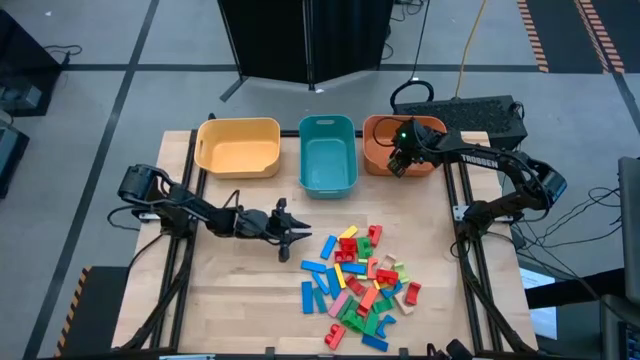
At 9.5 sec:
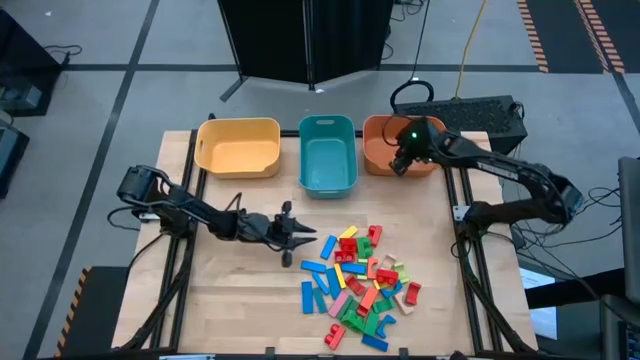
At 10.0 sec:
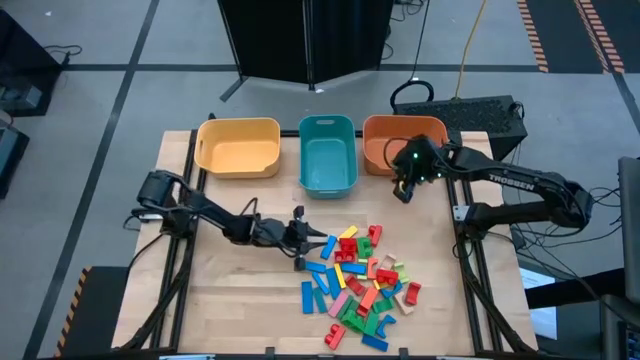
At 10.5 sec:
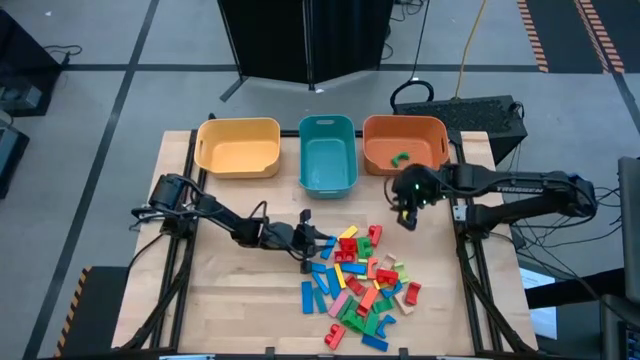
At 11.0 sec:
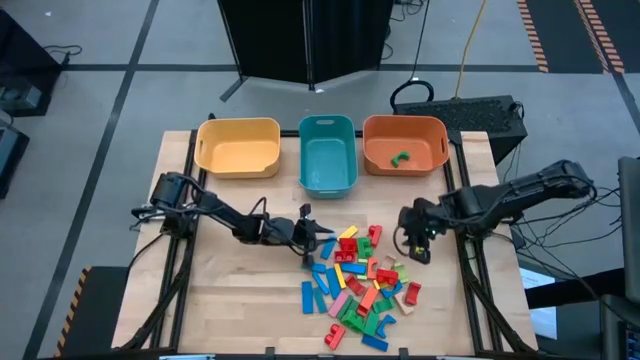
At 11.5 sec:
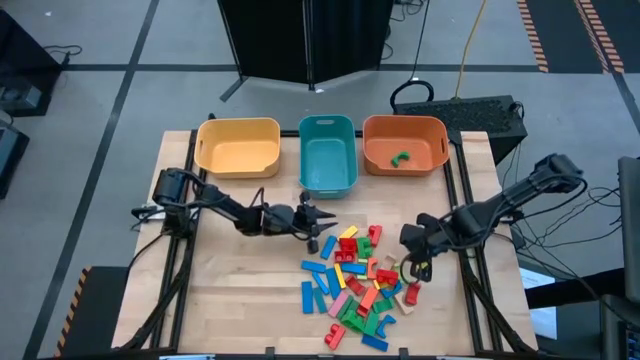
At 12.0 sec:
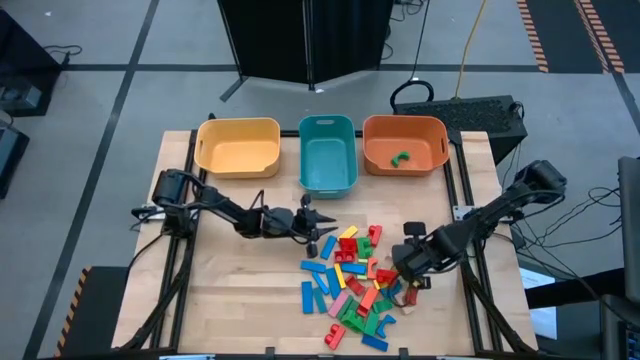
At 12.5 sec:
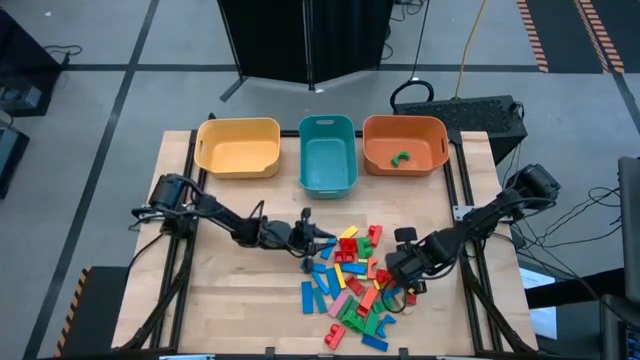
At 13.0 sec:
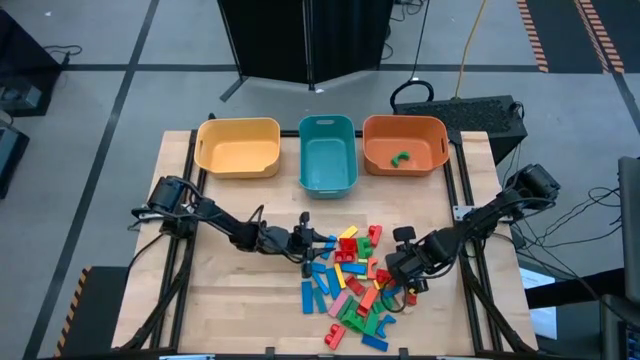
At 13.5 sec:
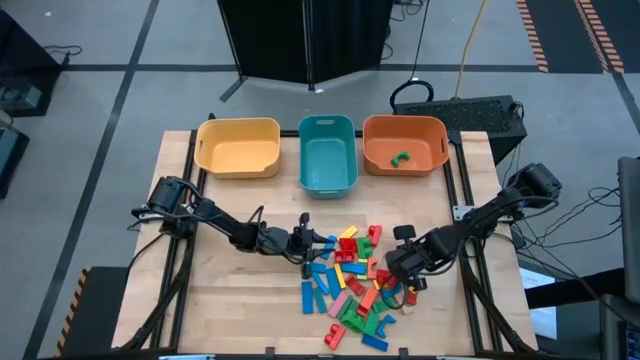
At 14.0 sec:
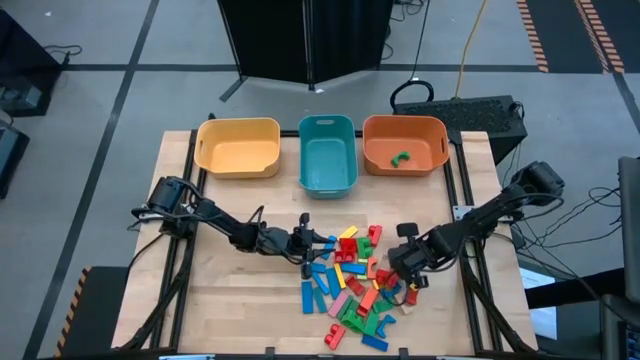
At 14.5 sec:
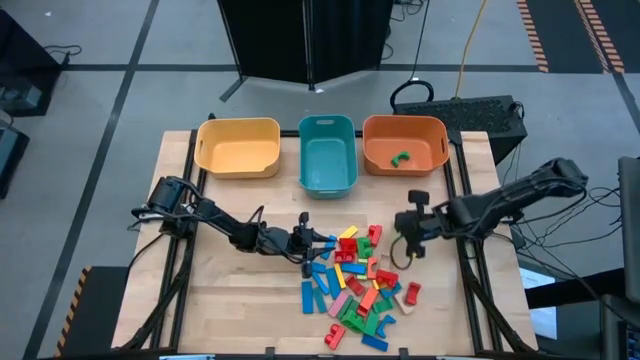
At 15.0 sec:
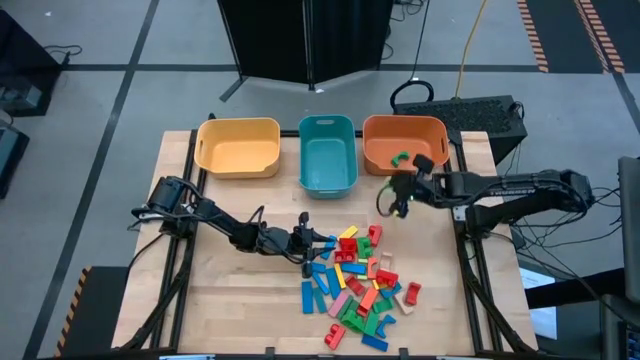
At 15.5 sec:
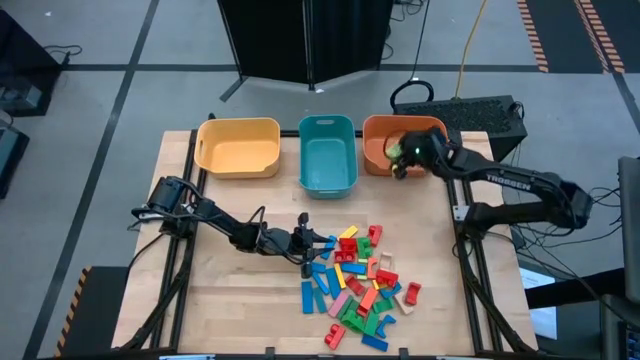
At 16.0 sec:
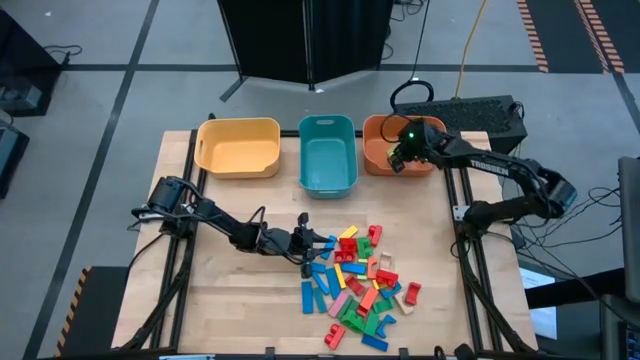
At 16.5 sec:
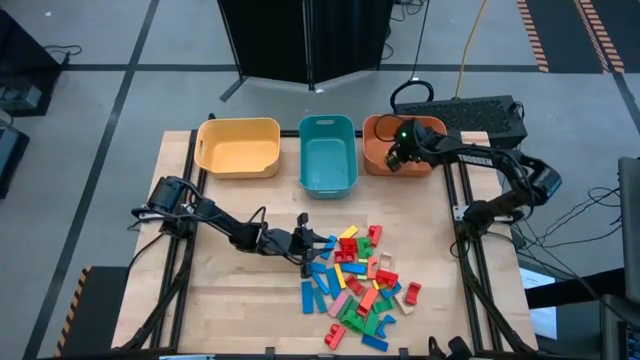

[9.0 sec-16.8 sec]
Task: Sort blocks by size
Put the light green arch block into the orange bin

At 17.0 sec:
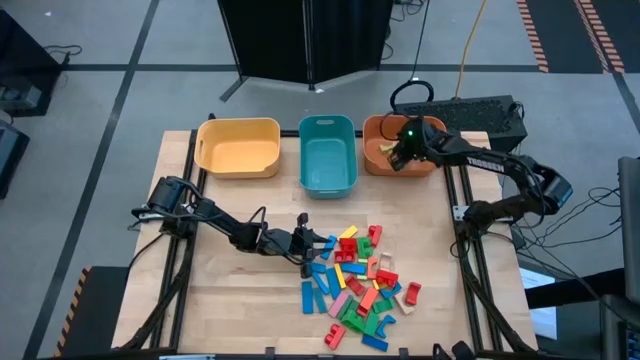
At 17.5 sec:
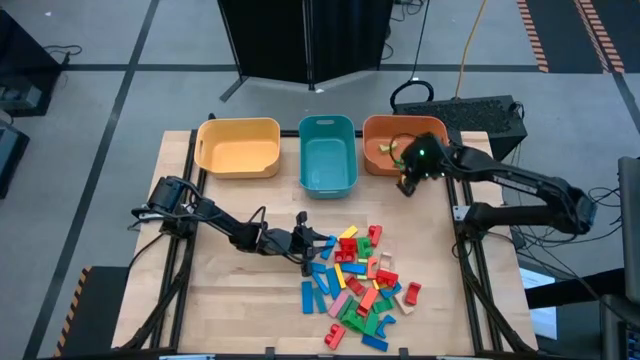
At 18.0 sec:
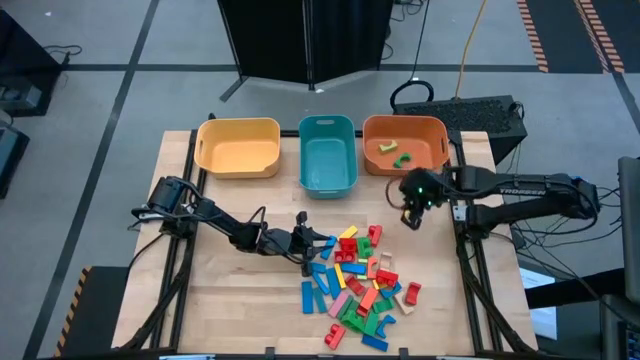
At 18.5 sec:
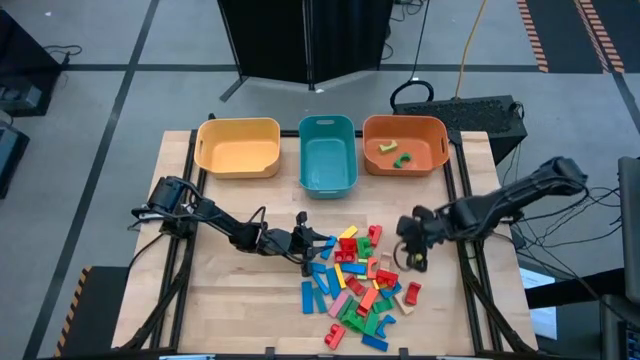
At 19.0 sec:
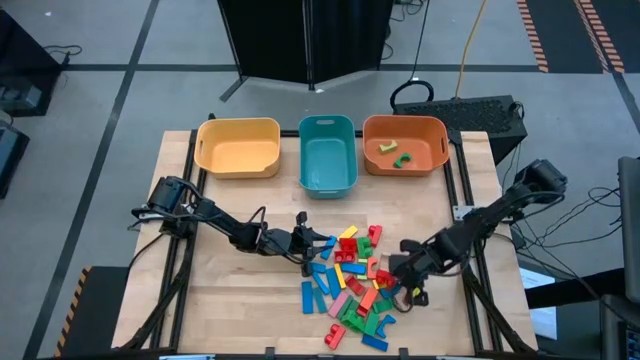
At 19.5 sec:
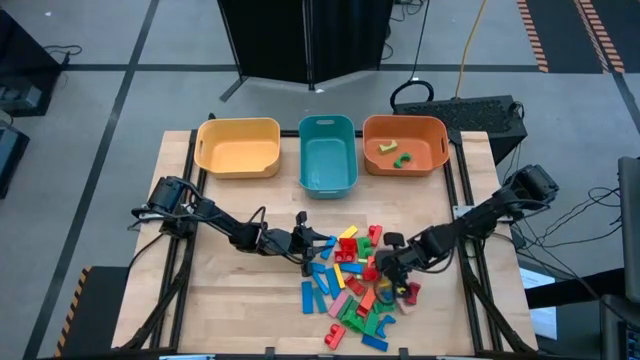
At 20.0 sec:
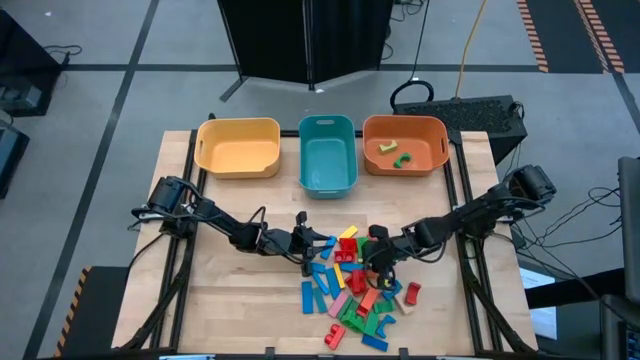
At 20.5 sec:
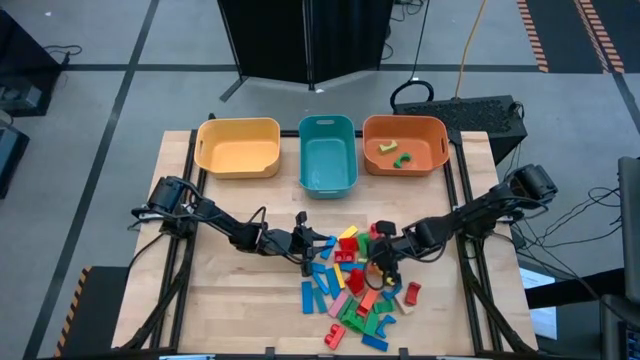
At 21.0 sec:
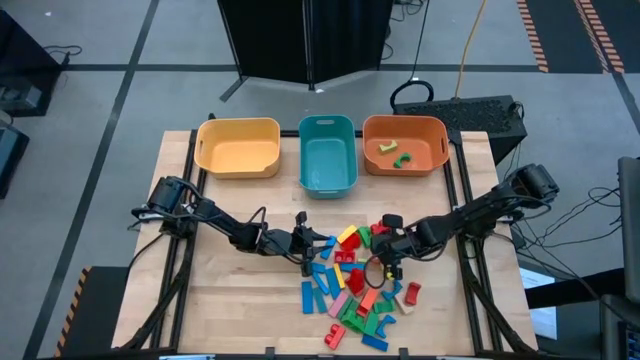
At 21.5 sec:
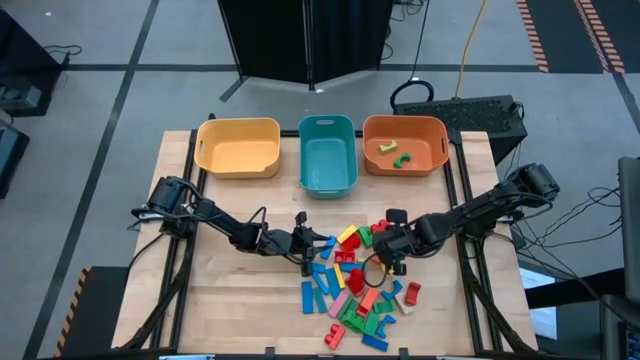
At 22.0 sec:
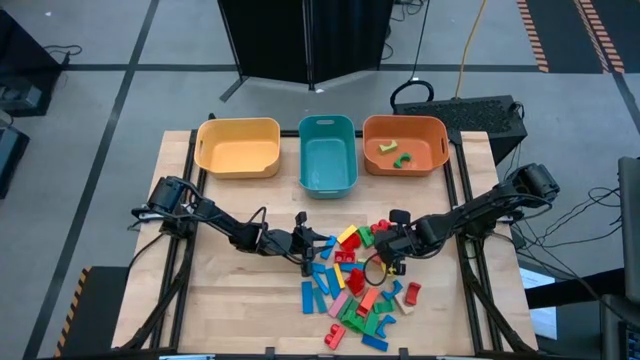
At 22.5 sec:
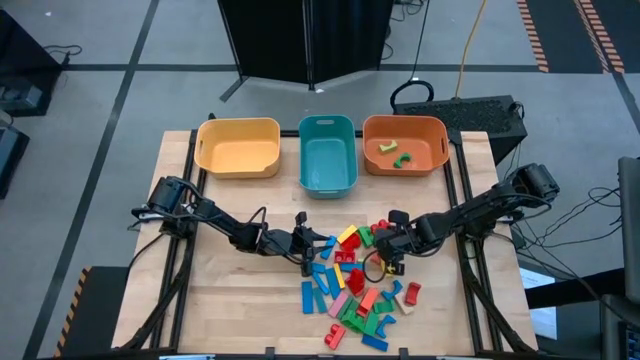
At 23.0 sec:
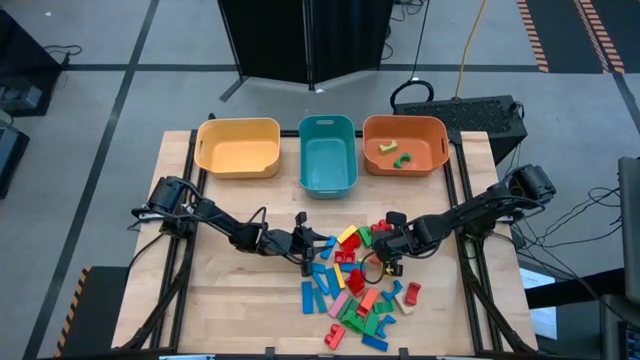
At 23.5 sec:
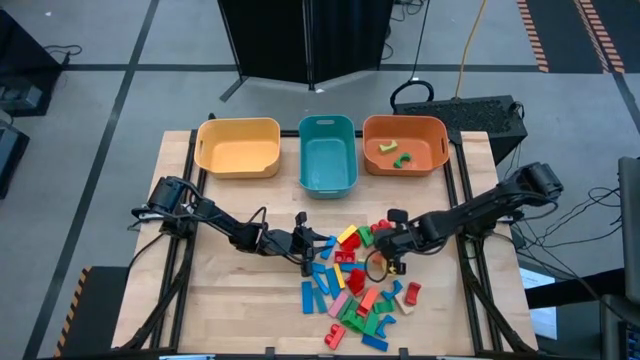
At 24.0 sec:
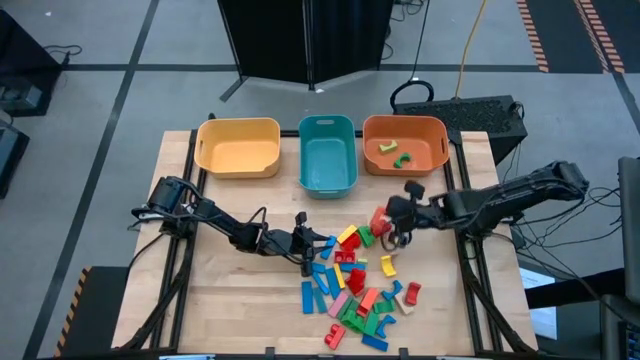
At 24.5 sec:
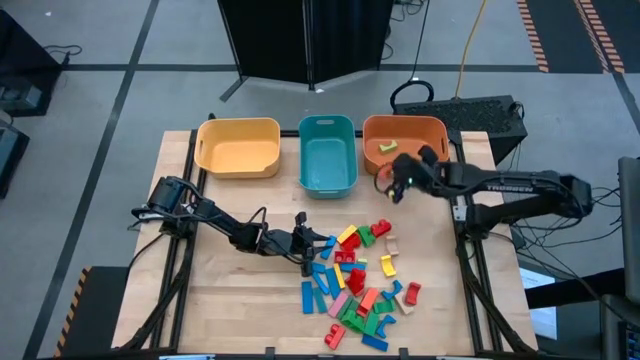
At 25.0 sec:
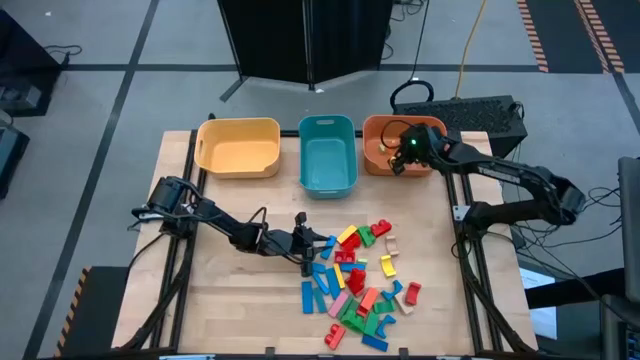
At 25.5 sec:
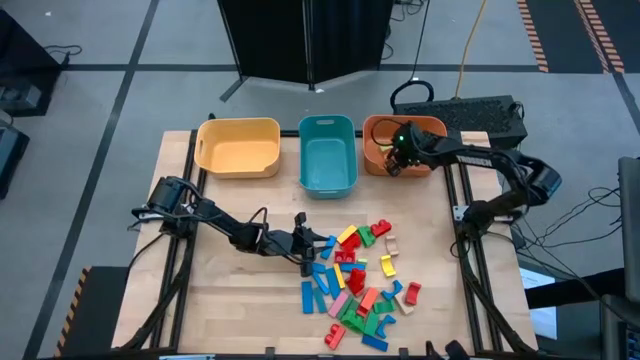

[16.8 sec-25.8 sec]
Put the orange arch block into the orange bin

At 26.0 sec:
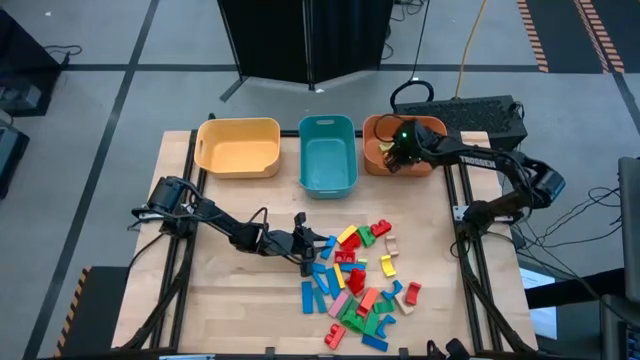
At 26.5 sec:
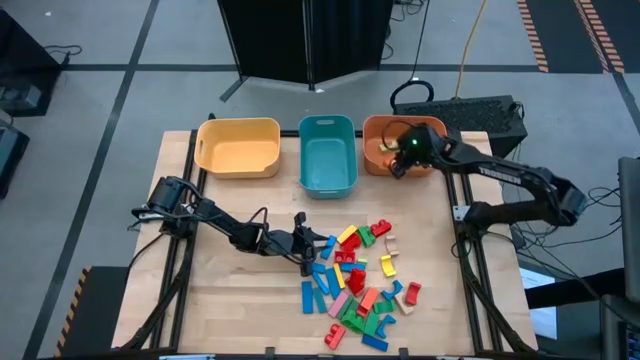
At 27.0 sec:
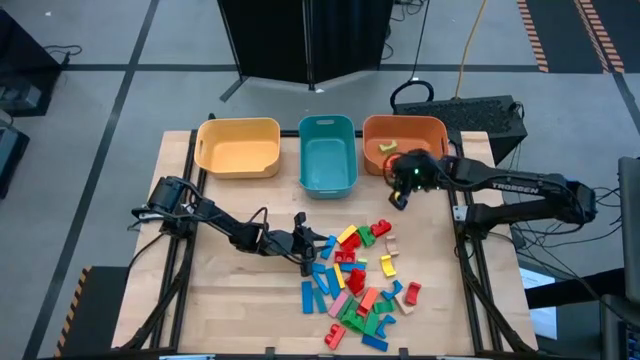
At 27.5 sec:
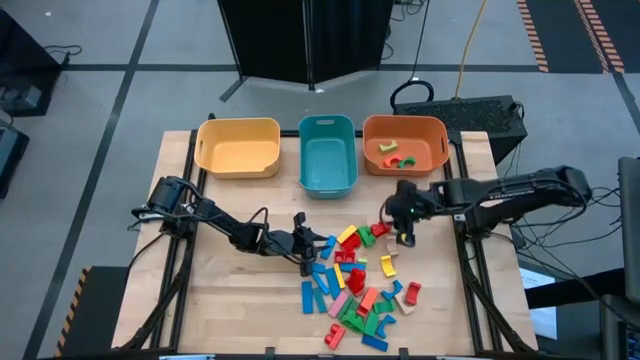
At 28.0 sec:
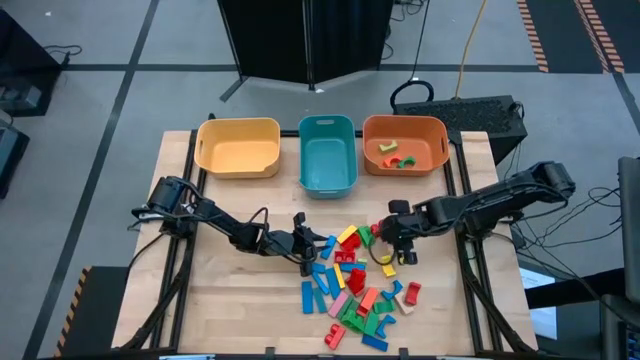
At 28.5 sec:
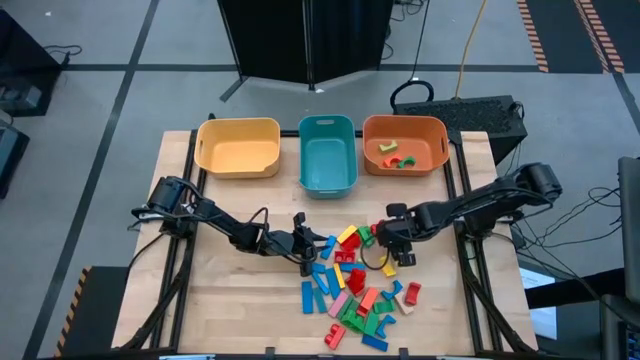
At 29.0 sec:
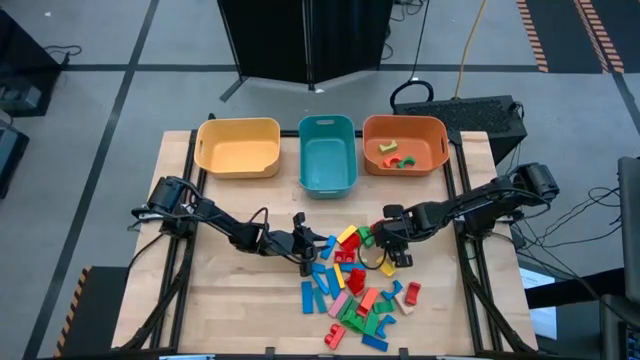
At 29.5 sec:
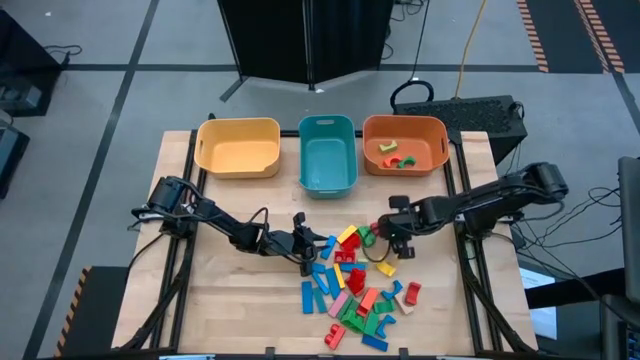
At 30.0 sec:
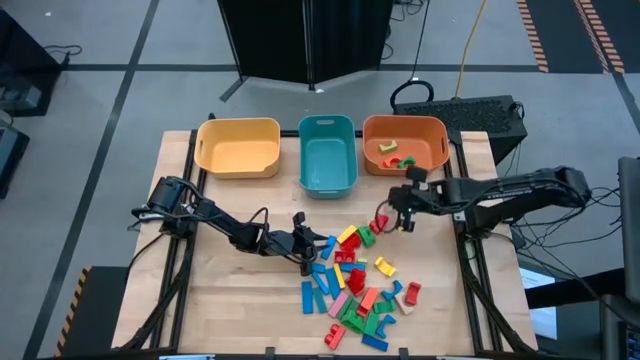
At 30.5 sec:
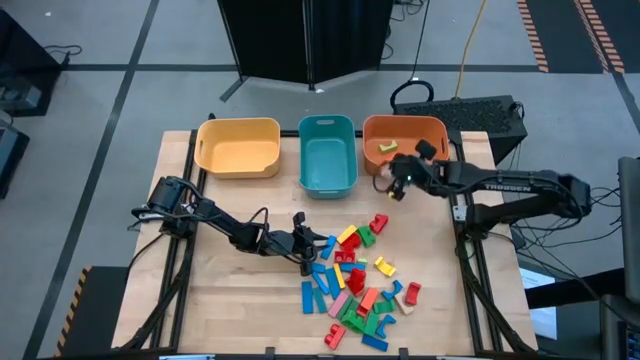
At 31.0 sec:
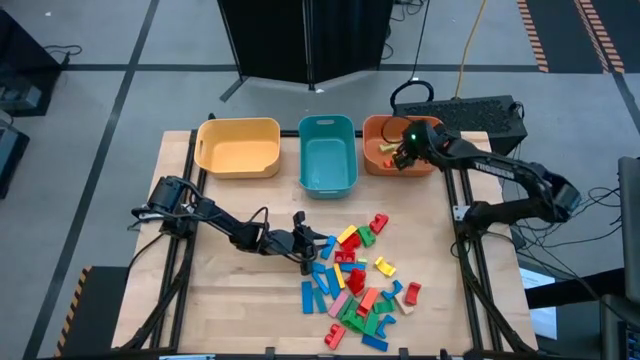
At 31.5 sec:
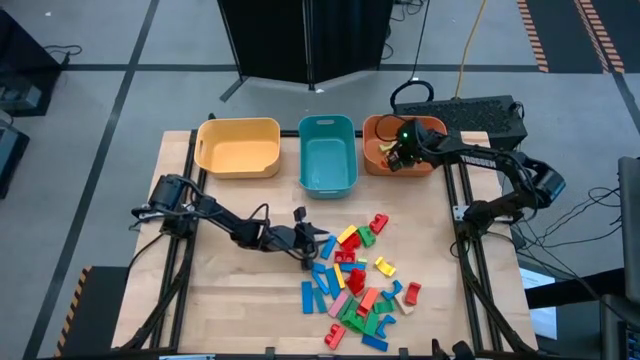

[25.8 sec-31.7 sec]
Put the light brown arch block into the orange bin
